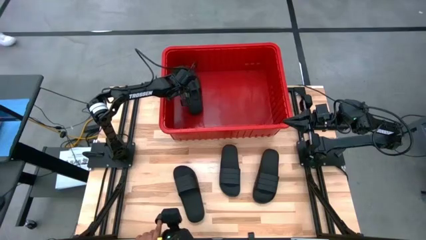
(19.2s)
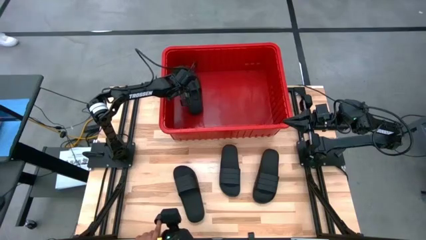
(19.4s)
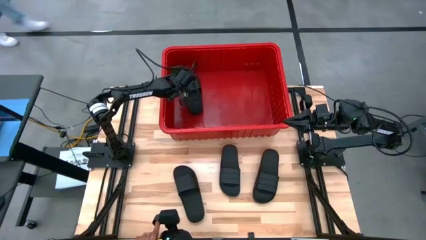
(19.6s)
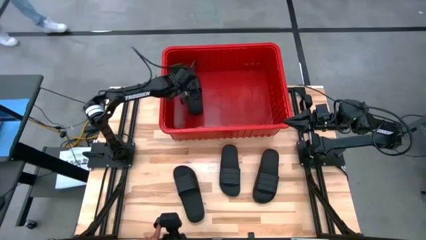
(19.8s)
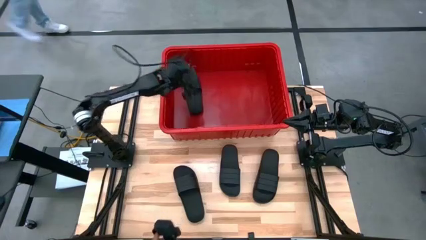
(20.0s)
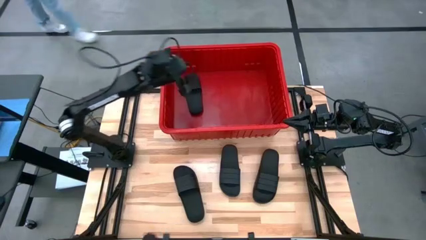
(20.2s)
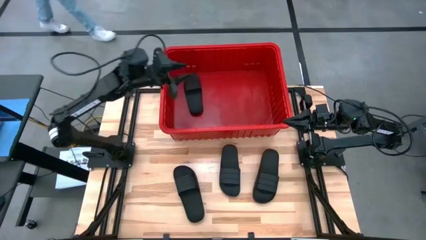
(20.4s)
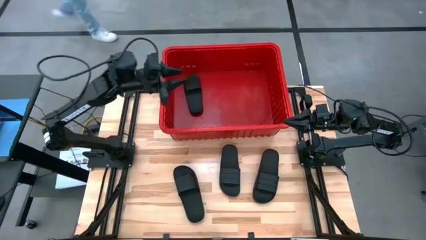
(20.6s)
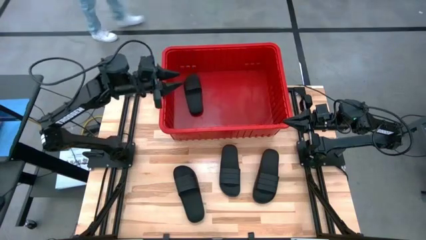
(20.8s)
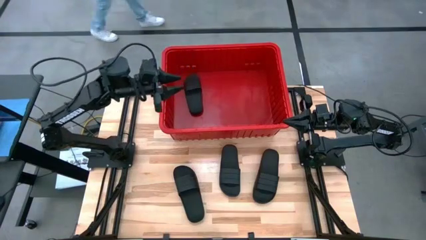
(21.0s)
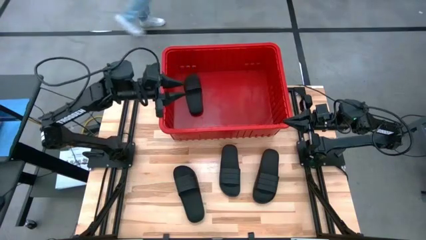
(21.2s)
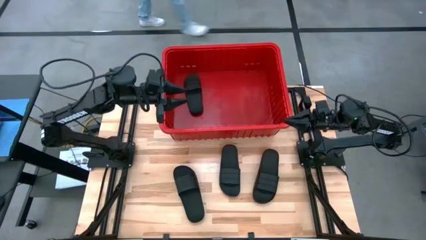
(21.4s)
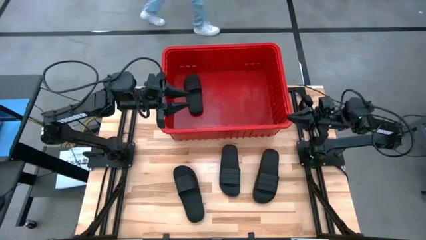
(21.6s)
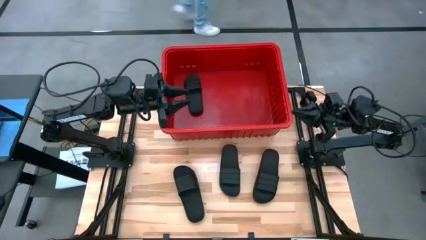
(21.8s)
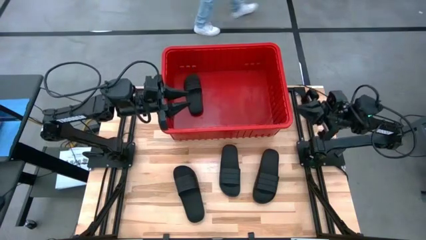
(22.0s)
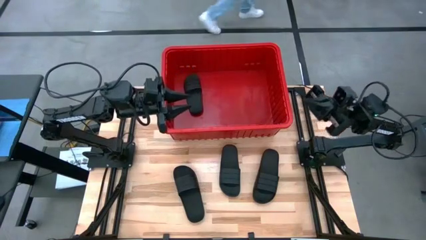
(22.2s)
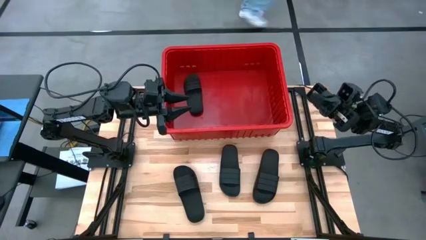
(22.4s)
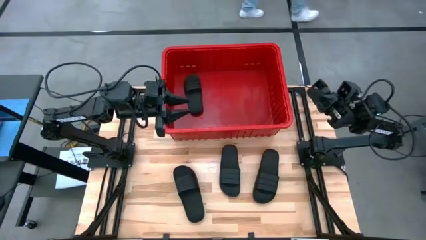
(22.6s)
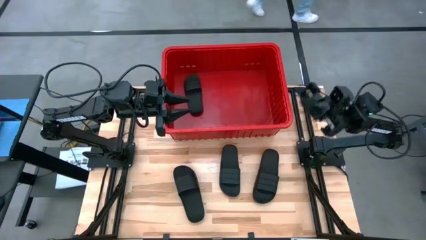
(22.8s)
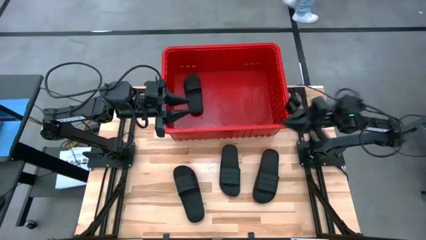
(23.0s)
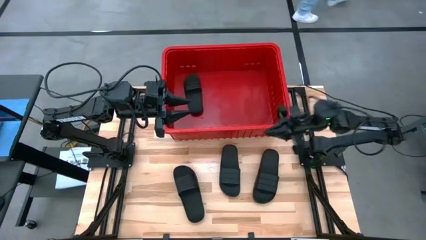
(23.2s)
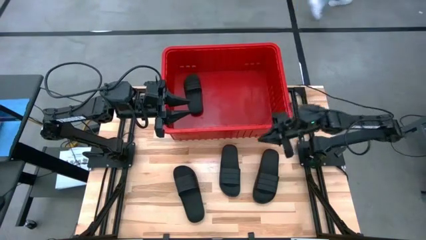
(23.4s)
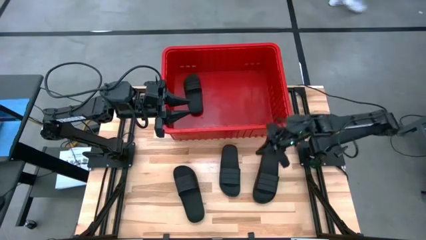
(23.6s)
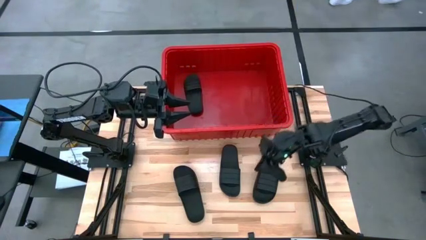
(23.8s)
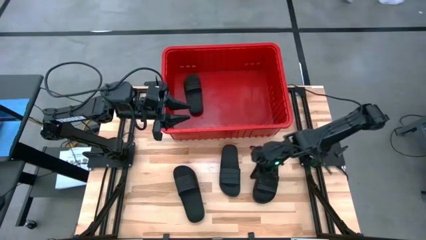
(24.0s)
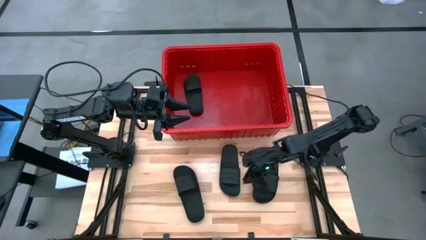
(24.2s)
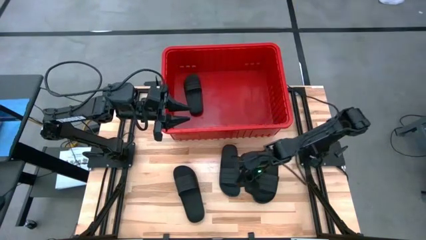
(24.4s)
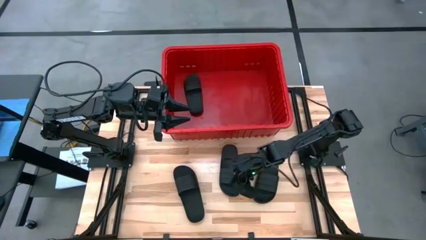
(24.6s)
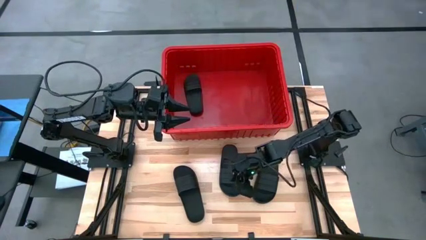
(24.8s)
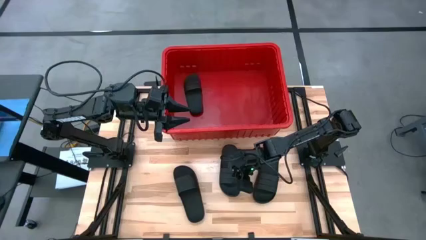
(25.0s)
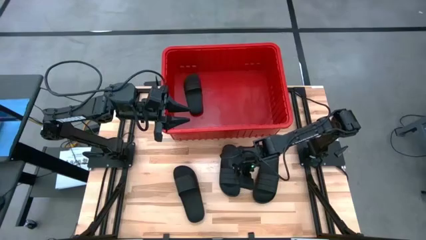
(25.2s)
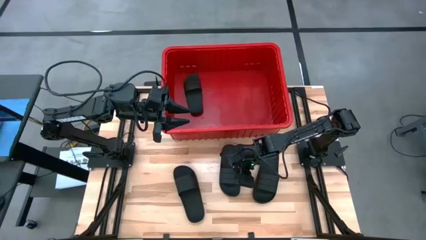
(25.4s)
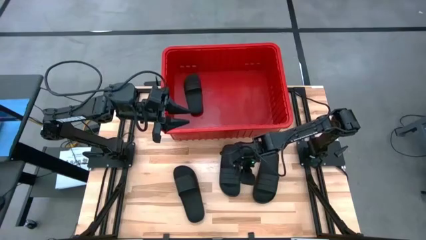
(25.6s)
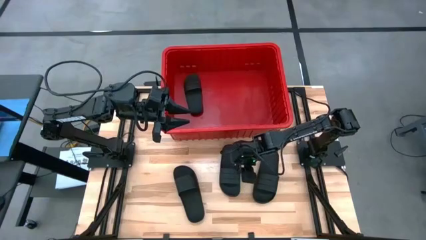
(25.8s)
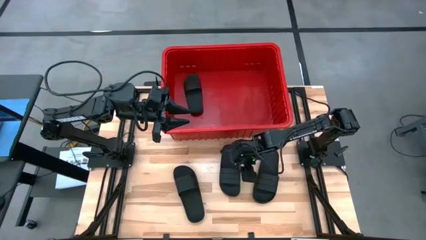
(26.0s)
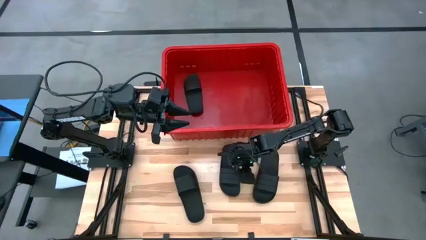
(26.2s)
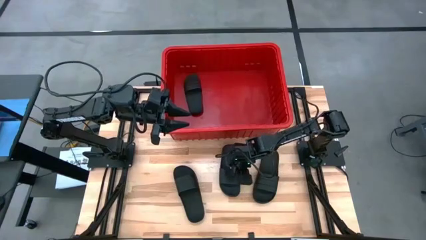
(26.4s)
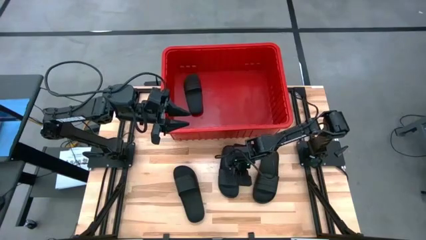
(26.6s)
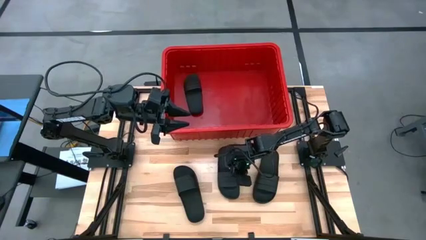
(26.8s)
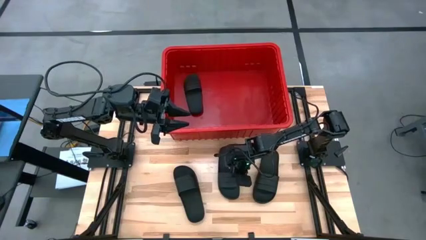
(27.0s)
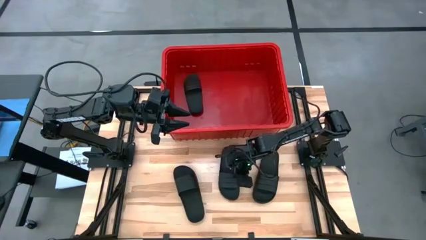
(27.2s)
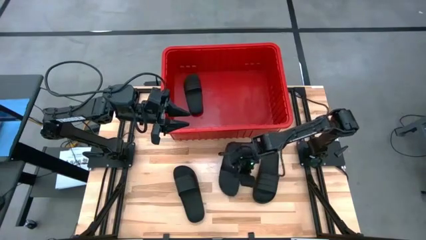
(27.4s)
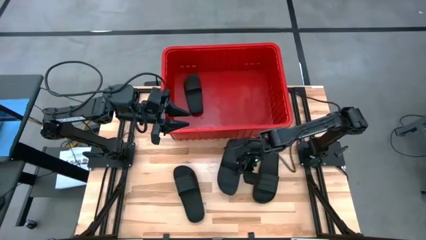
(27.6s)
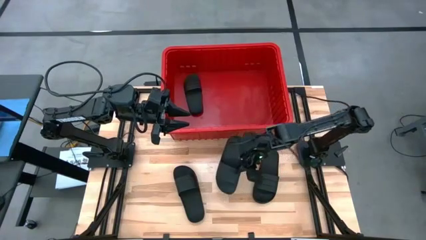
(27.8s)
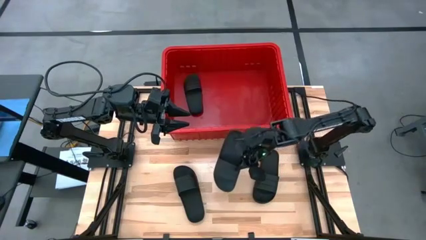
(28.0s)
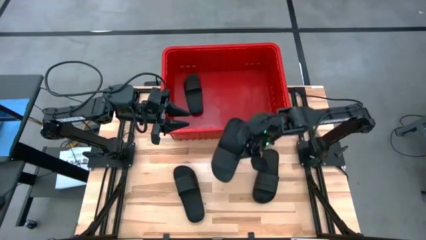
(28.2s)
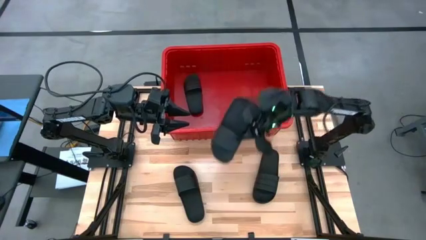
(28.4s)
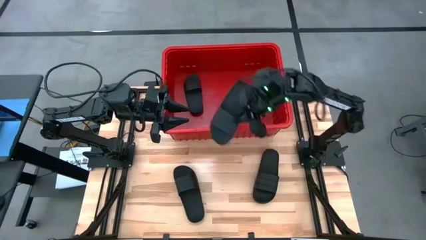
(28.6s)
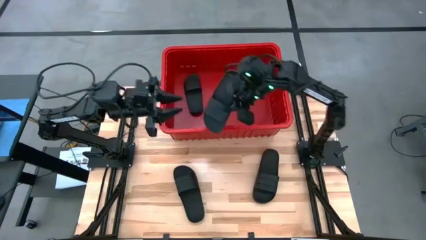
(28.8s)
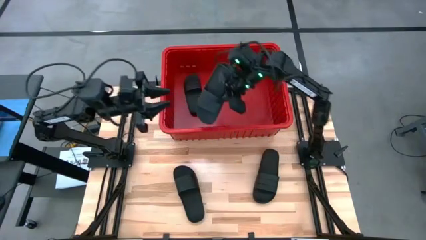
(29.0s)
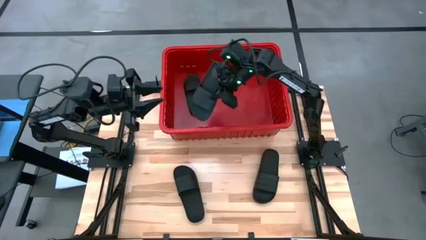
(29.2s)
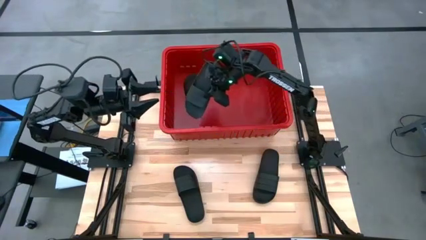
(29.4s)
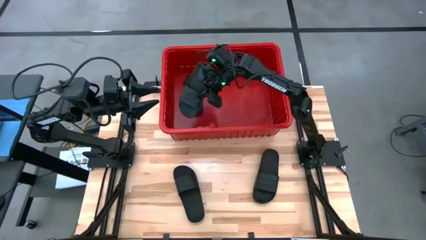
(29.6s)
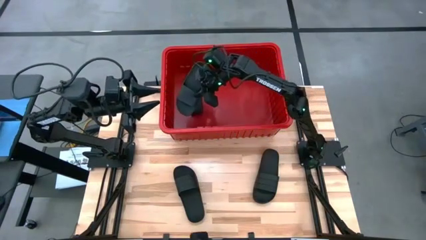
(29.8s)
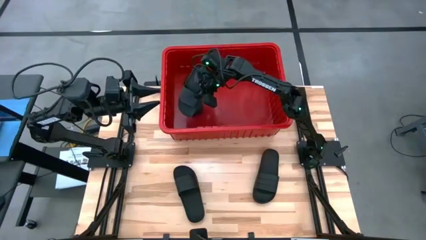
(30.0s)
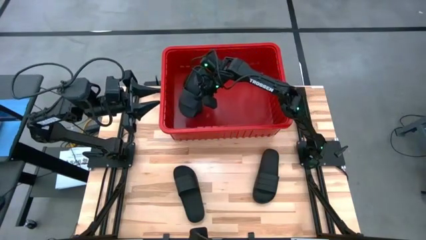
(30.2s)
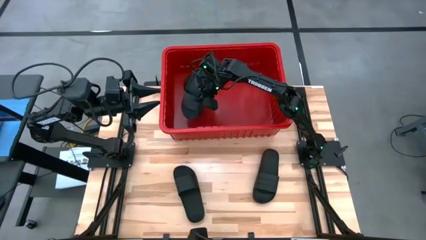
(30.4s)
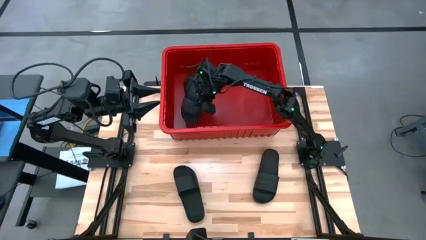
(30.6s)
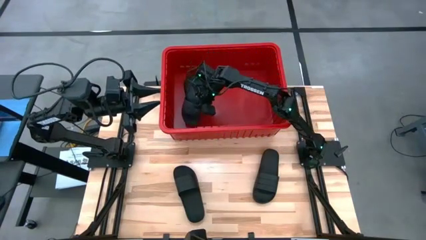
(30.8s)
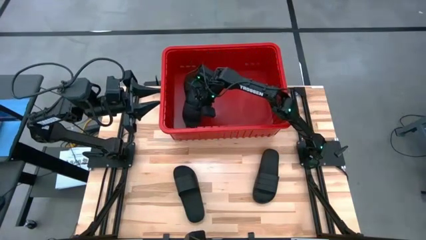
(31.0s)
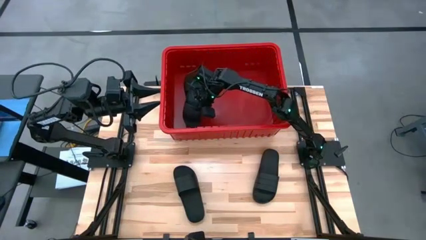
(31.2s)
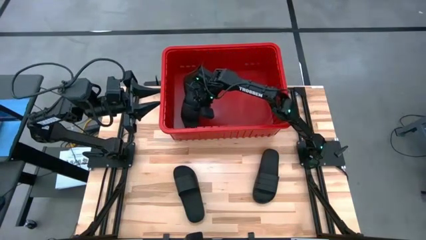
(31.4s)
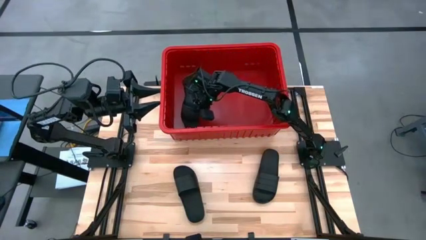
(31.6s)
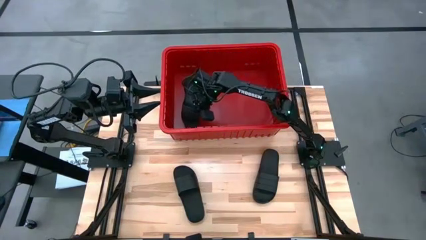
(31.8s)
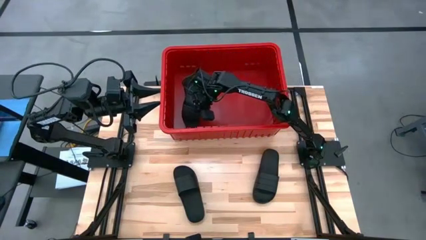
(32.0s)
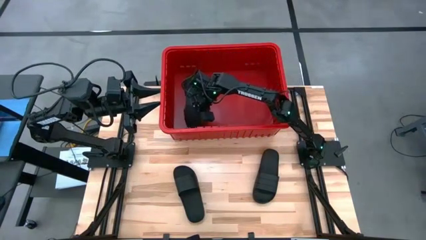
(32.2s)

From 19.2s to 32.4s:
Task: Pick and place slides into bin
Put the black slides into the red bin
